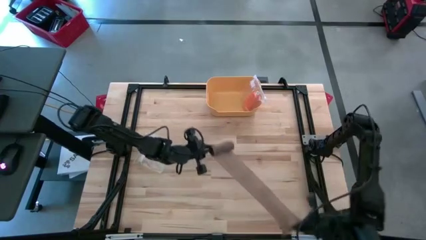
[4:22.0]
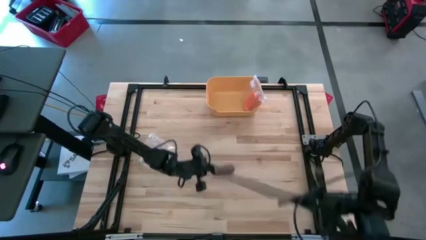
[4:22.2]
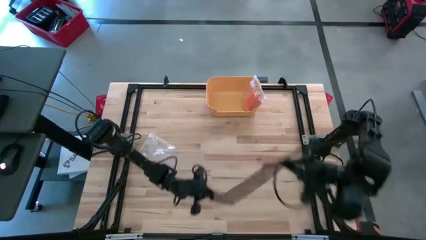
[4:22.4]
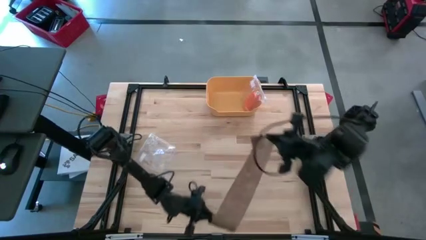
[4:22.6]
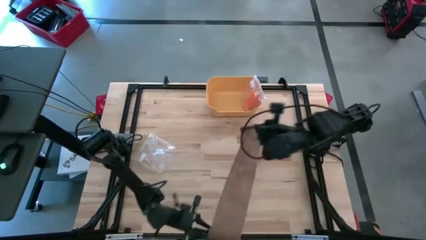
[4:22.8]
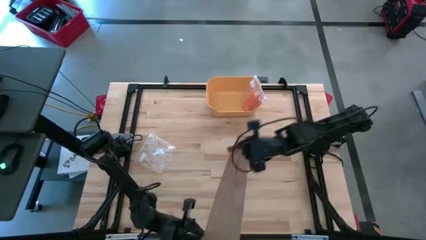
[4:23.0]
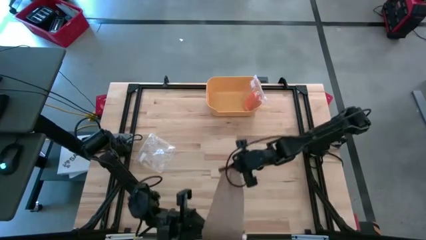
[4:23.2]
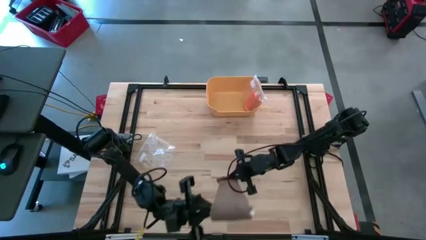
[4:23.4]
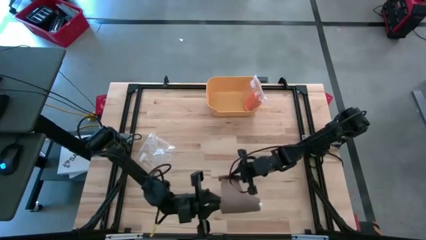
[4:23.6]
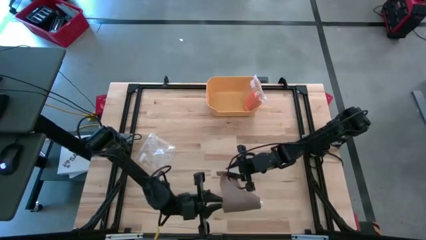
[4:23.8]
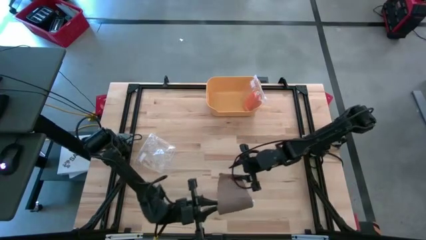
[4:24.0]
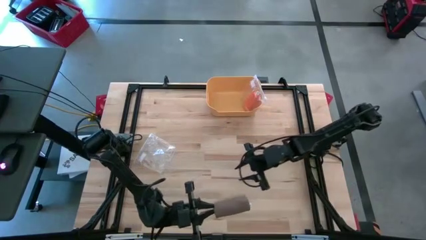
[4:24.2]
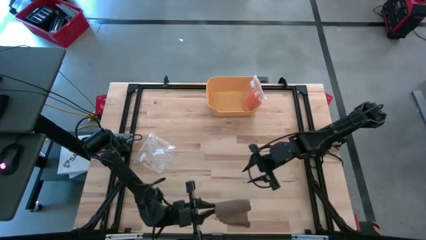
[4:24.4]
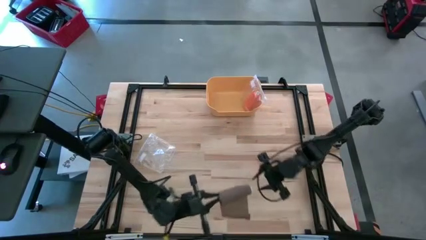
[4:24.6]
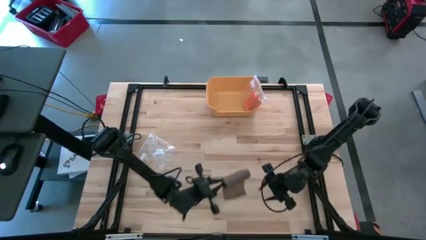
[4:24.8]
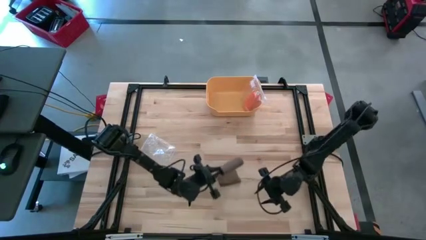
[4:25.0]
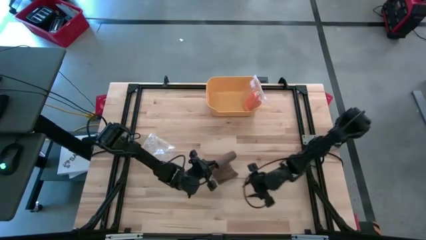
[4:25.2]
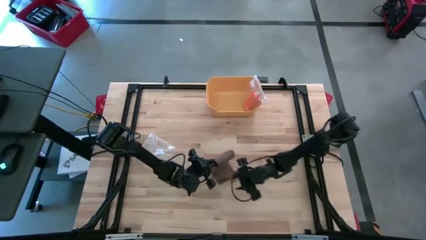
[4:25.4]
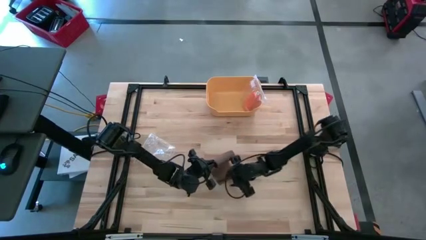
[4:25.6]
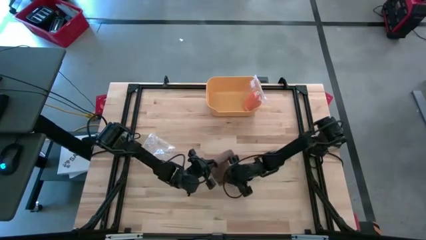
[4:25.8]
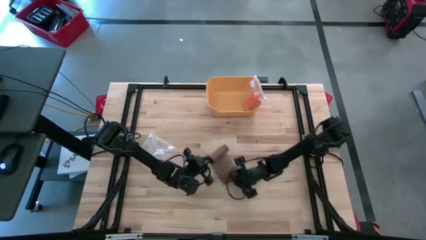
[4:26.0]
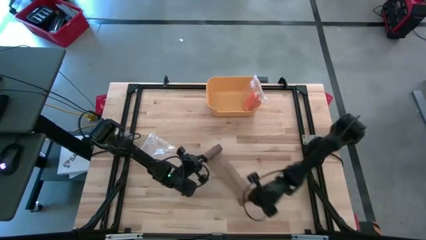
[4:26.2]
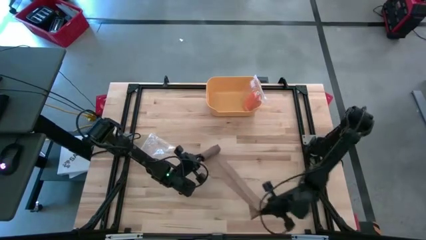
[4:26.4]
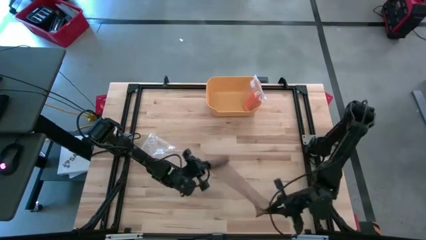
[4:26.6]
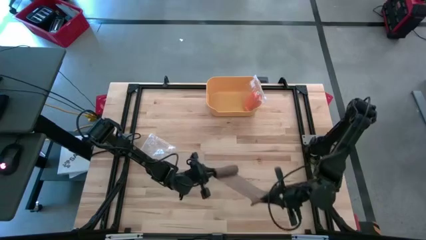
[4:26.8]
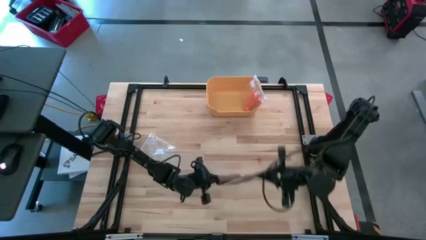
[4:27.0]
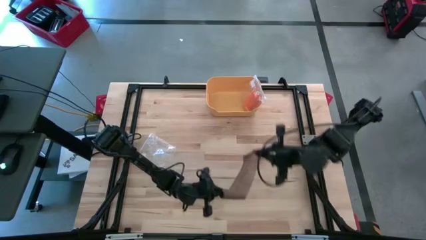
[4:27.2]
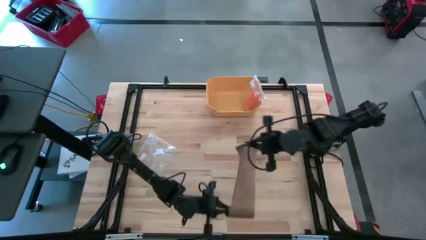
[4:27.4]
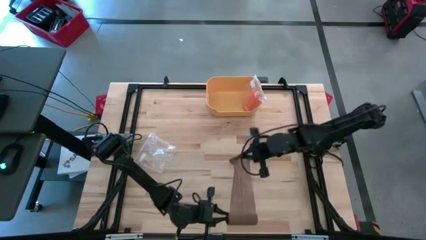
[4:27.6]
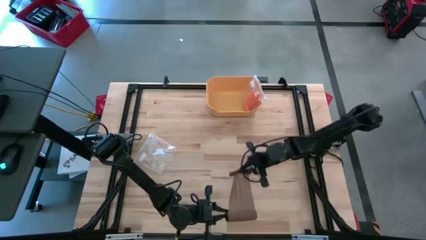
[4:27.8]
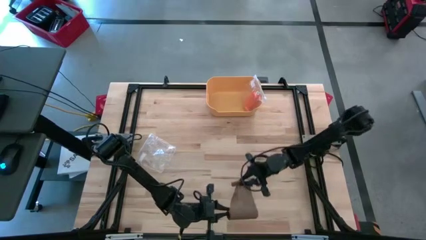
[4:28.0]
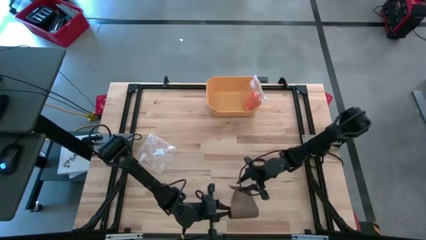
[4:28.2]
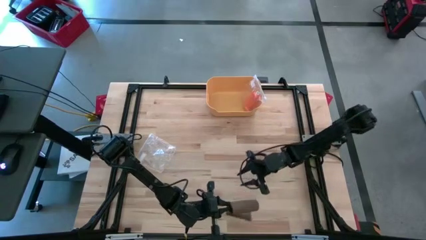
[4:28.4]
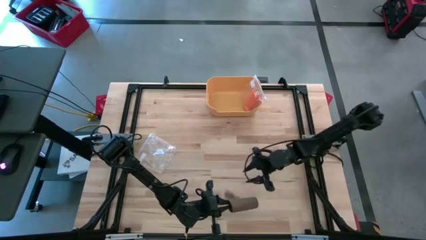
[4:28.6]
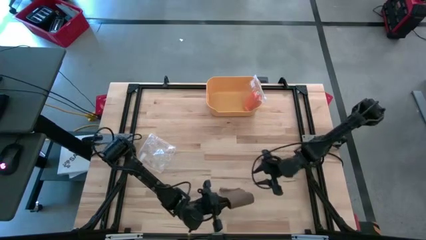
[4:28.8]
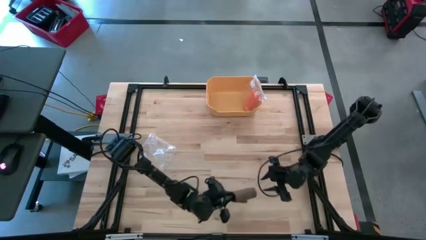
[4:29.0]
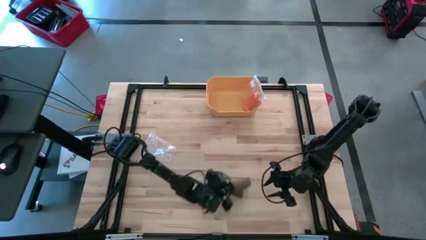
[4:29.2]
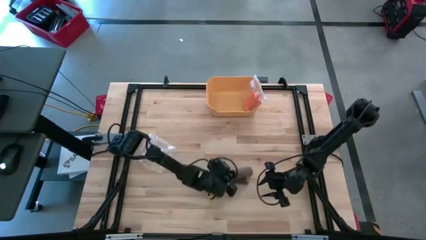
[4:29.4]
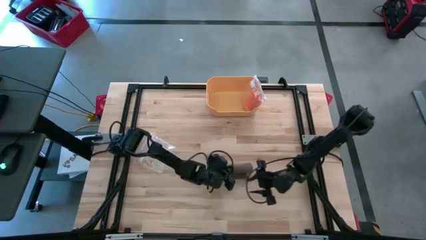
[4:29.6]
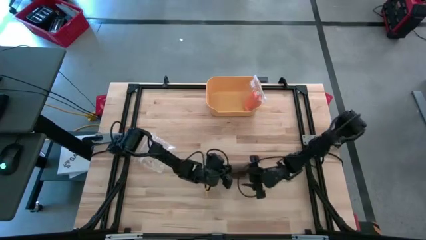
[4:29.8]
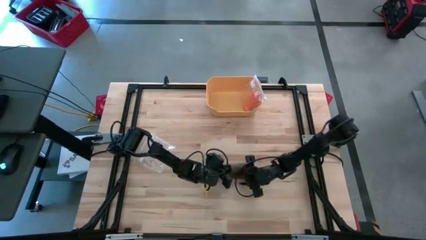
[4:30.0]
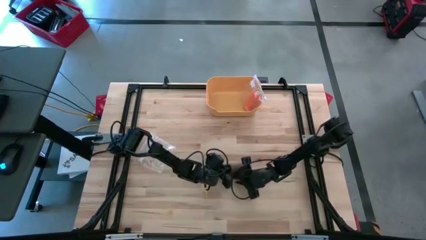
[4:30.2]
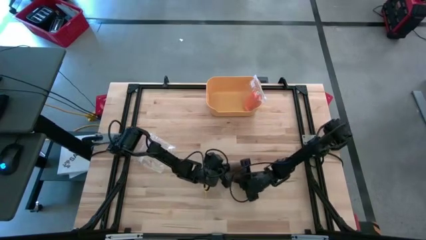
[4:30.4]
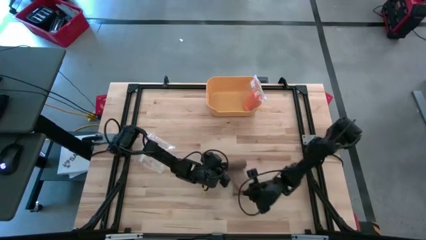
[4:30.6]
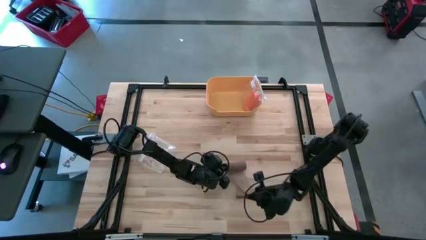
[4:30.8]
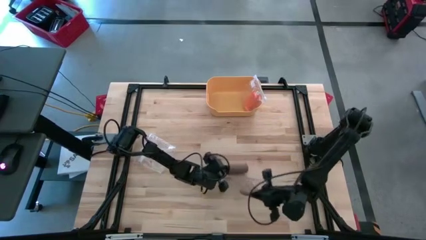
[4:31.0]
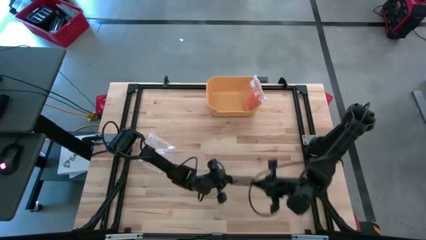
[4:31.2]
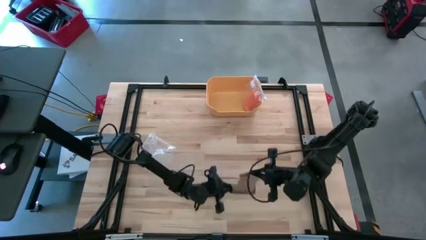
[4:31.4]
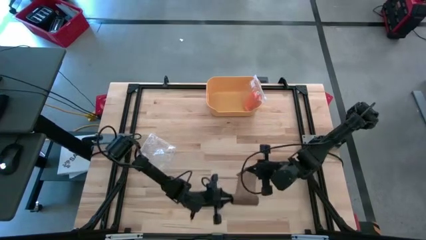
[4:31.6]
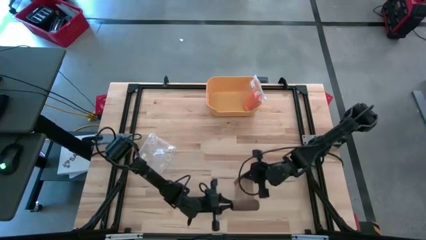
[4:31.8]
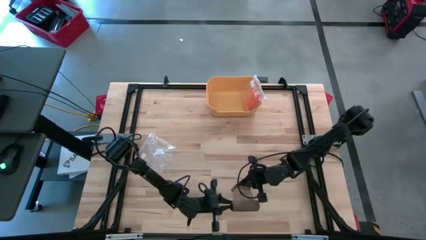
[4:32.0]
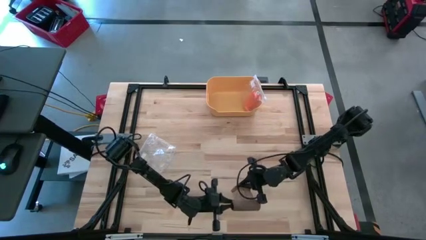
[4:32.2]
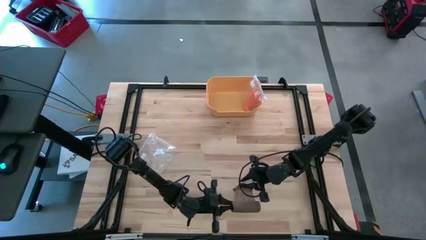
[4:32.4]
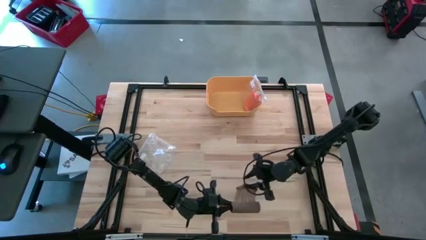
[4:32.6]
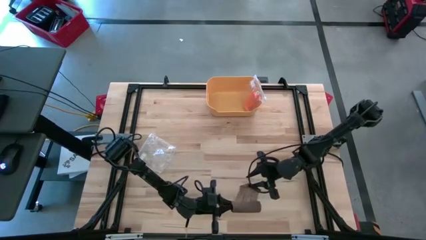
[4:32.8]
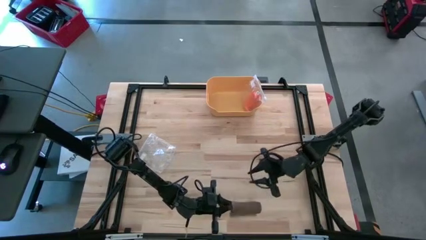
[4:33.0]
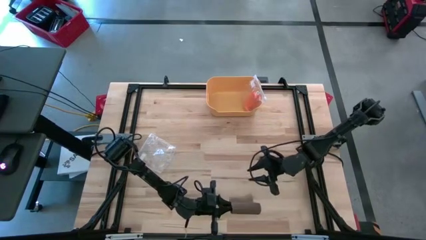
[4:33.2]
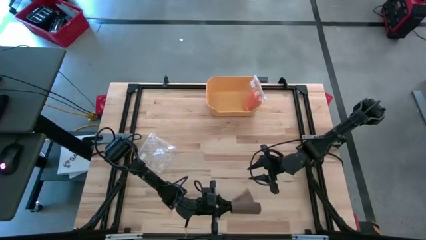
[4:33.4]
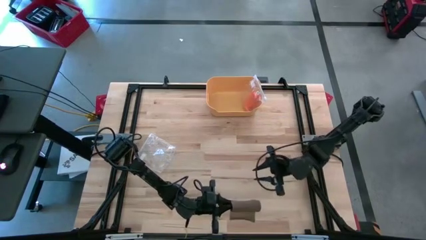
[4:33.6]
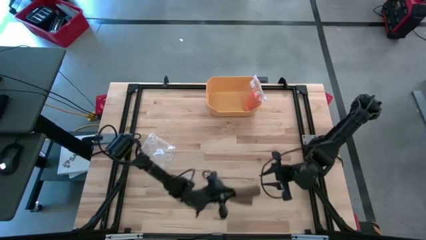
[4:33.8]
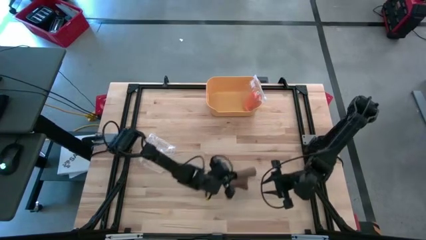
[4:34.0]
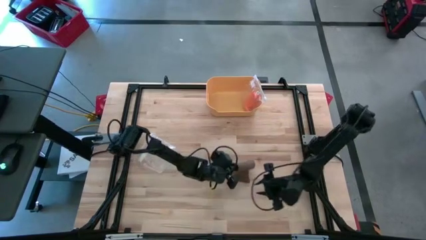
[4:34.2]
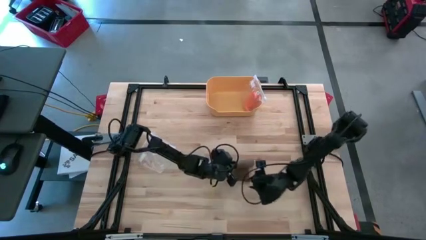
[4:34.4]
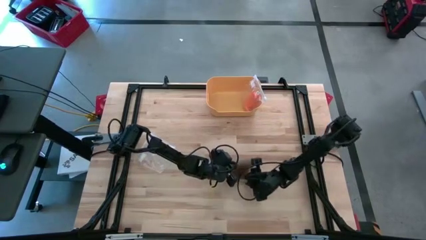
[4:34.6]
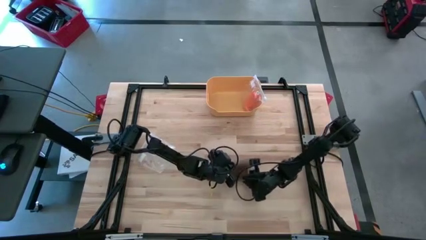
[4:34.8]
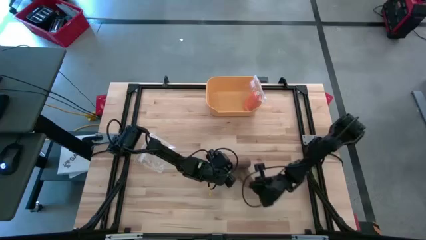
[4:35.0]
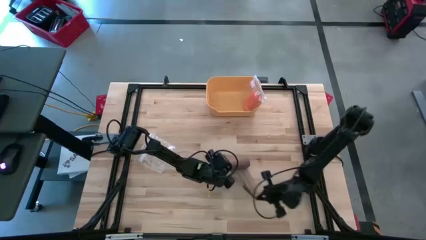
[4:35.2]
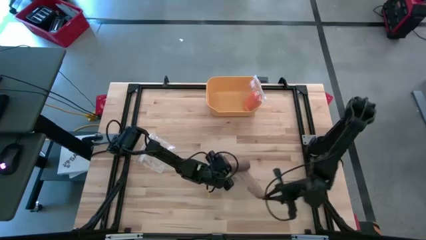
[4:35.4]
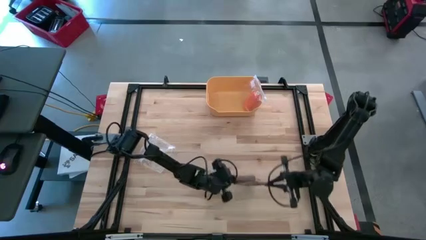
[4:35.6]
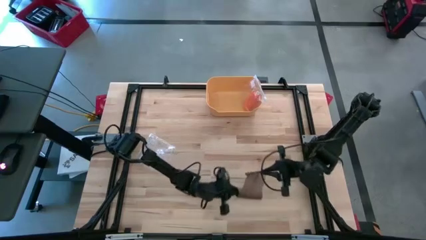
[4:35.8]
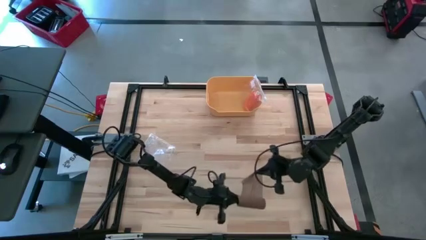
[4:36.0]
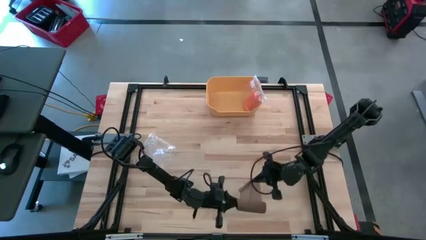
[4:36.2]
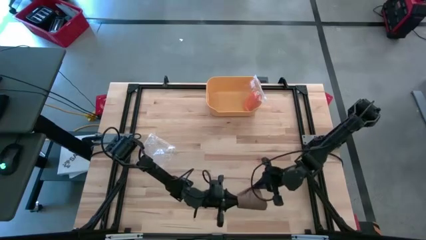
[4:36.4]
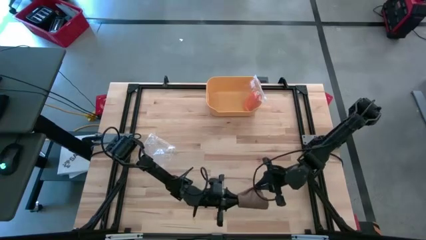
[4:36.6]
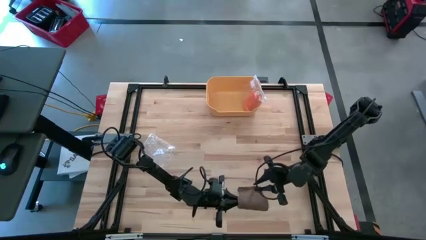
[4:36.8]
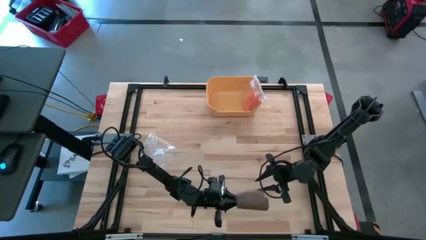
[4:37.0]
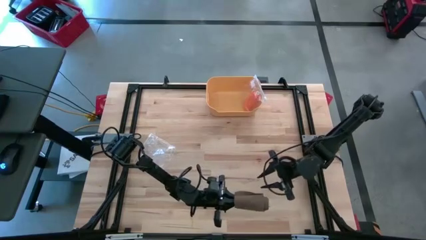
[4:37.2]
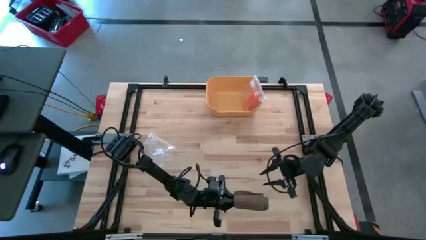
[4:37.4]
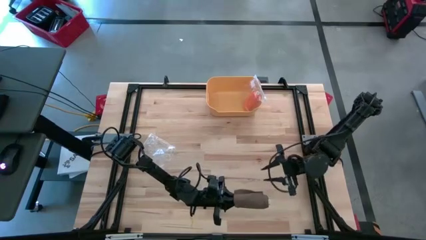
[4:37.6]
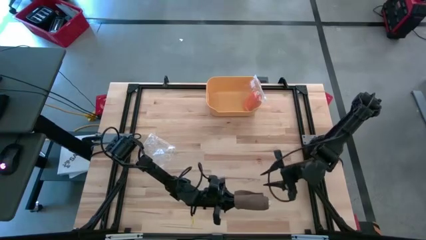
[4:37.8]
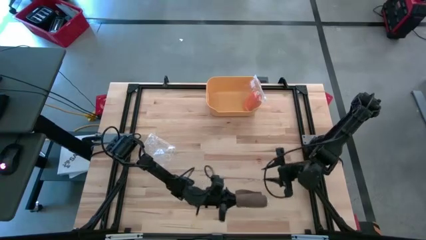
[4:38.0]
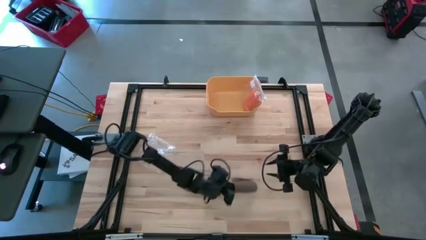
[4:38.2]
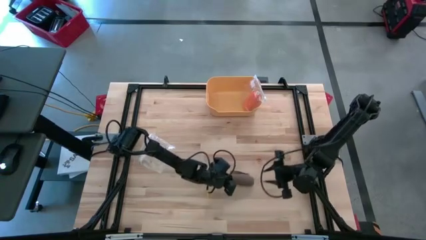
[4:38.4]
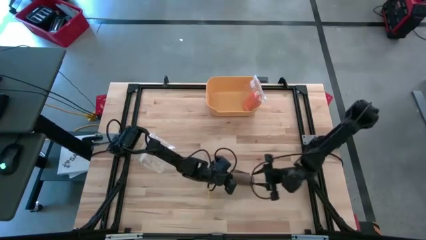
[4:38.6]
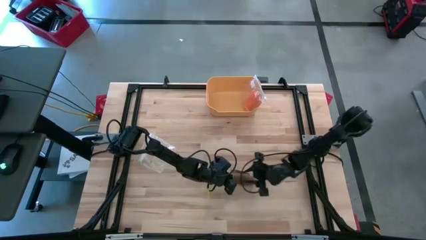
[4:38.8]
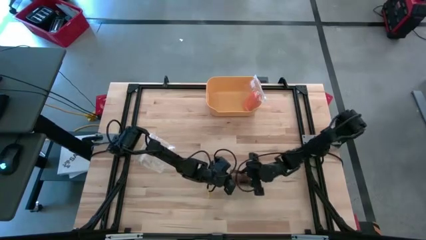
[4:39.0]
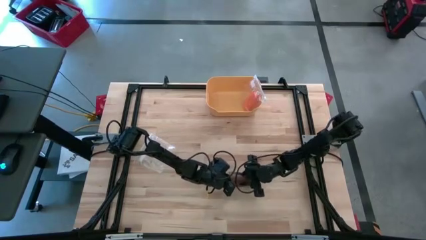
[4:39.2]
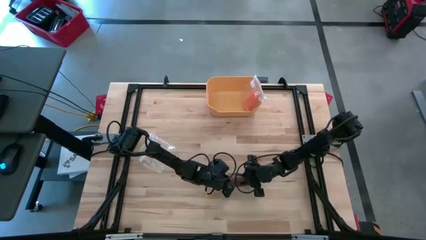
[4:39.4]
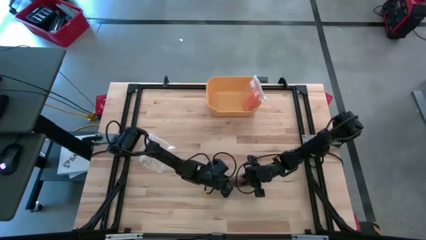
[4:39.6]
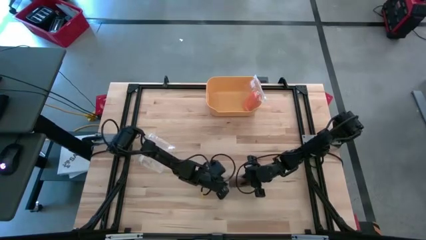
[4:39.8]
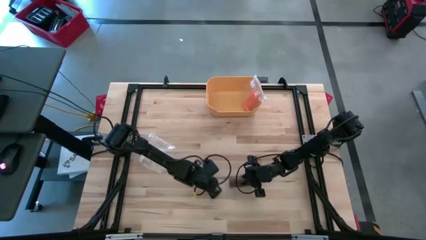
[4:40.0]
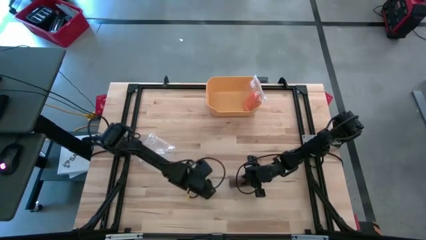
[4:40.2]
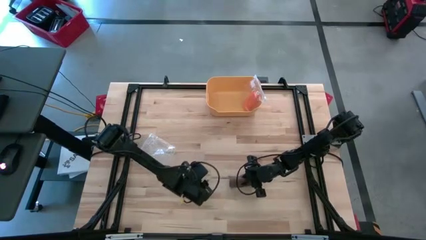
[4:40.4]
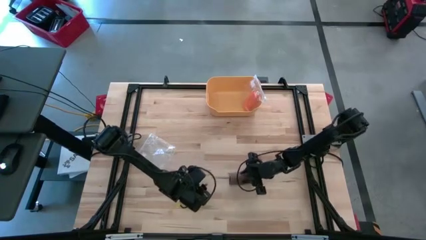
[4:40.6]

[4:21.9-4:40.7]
Task: Roll bandage
Roll the brown bandage
